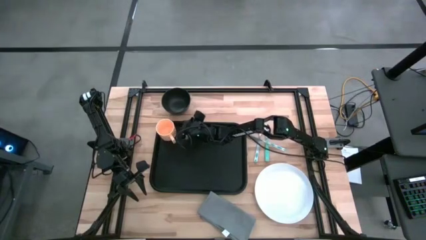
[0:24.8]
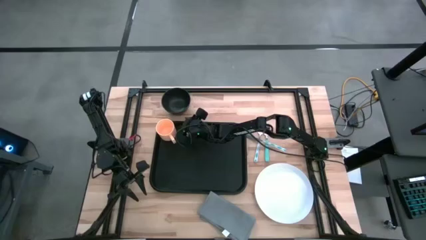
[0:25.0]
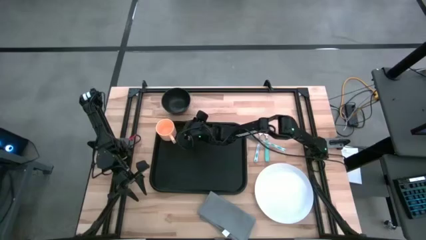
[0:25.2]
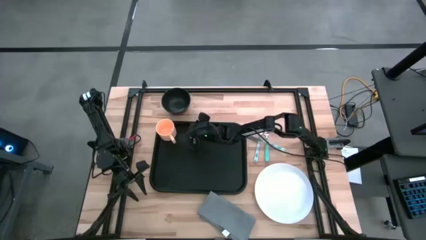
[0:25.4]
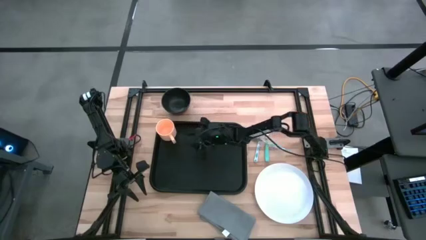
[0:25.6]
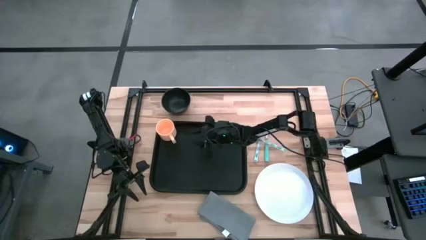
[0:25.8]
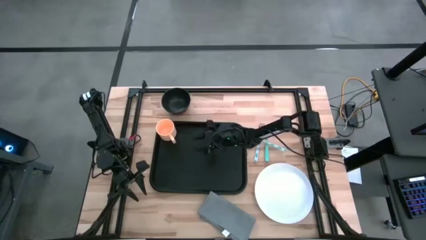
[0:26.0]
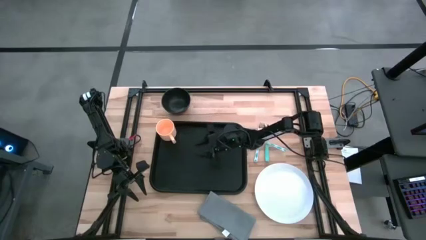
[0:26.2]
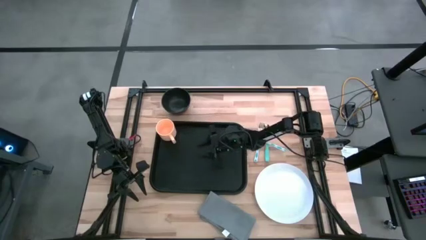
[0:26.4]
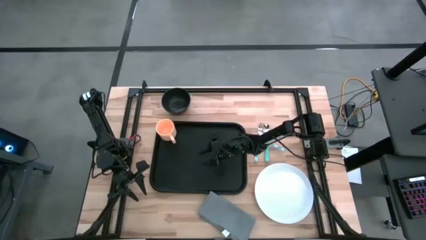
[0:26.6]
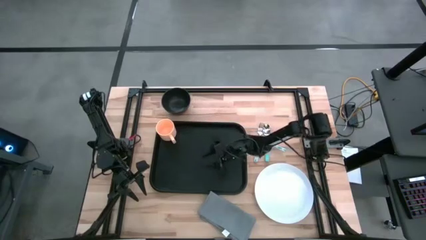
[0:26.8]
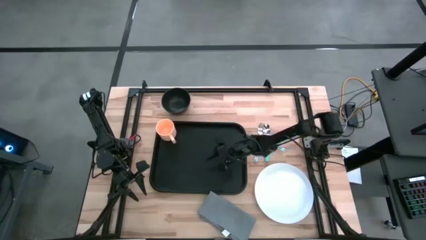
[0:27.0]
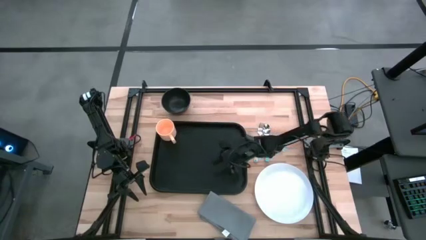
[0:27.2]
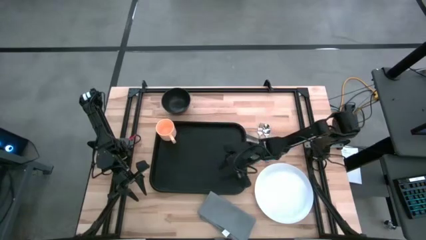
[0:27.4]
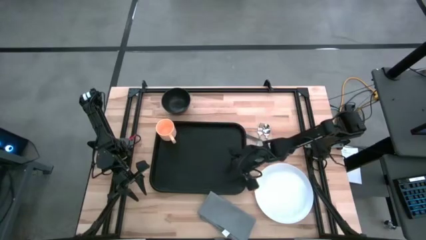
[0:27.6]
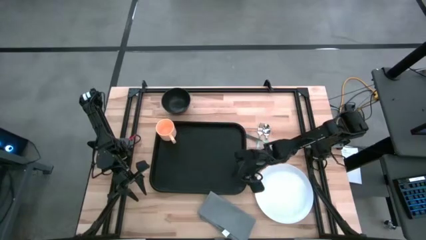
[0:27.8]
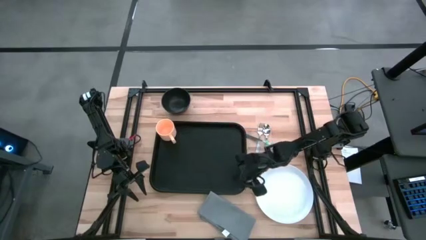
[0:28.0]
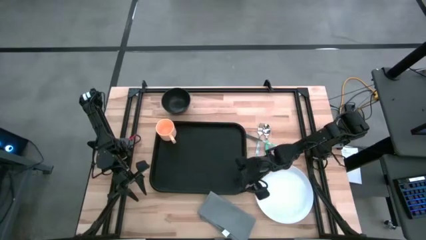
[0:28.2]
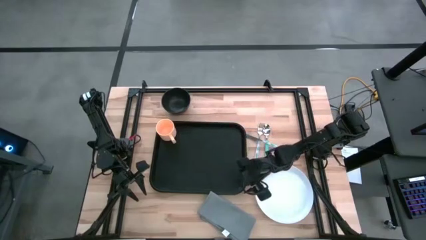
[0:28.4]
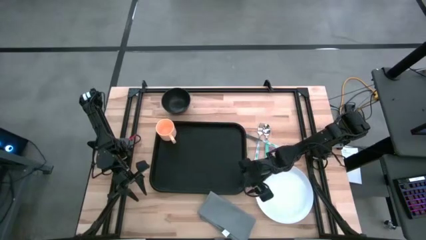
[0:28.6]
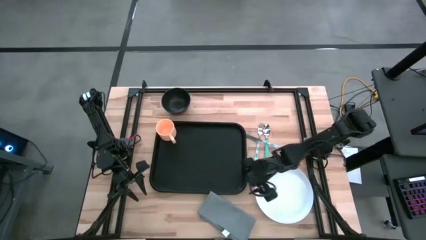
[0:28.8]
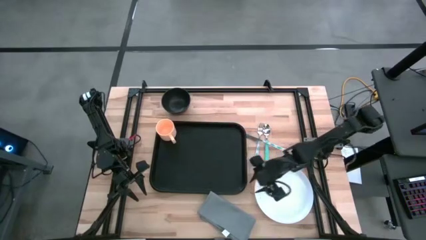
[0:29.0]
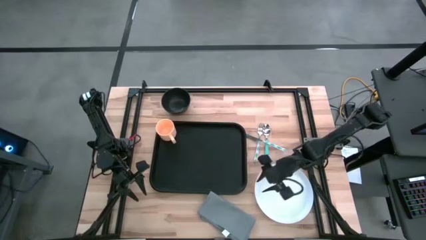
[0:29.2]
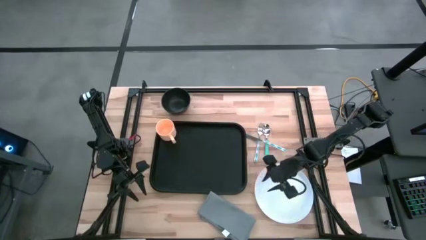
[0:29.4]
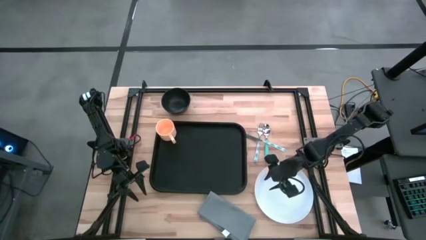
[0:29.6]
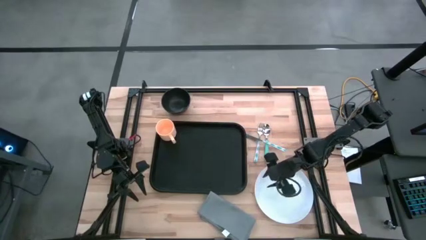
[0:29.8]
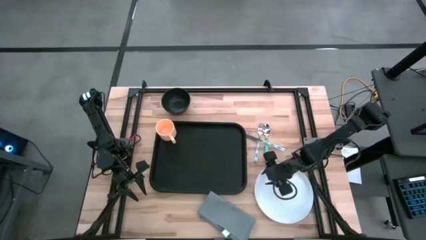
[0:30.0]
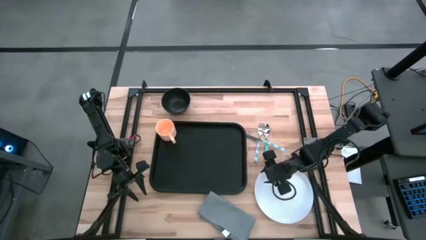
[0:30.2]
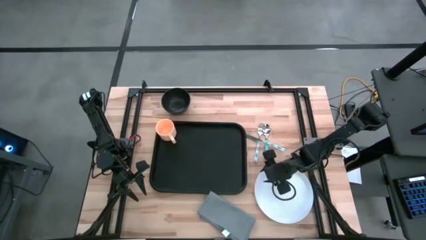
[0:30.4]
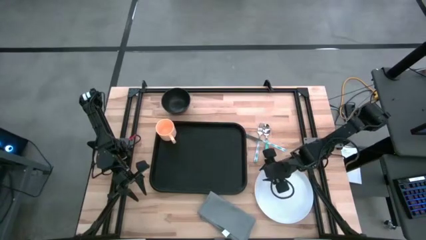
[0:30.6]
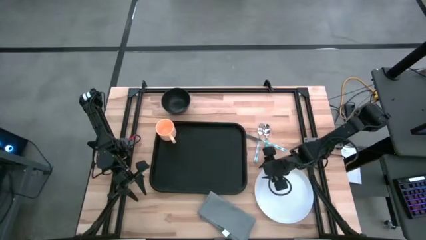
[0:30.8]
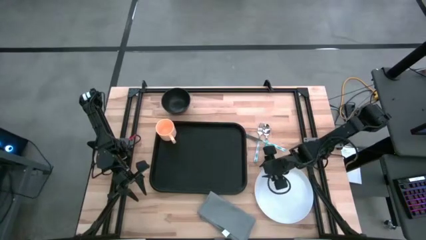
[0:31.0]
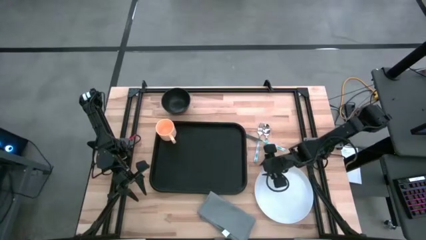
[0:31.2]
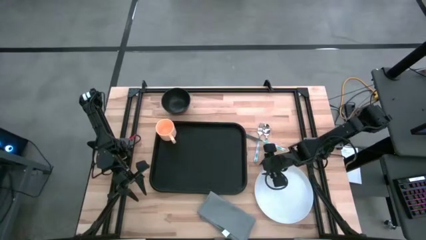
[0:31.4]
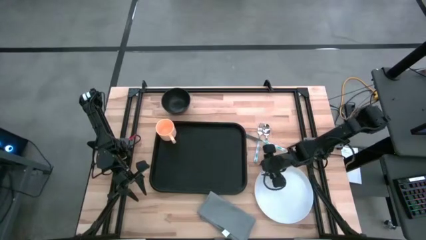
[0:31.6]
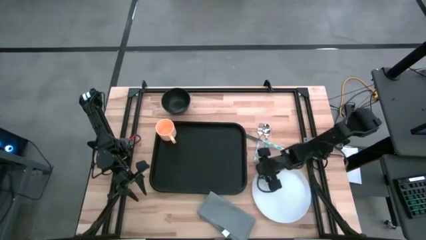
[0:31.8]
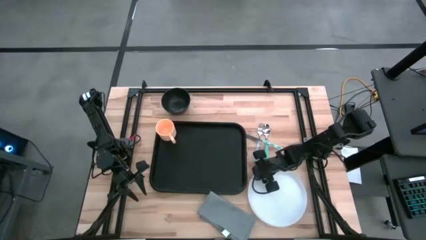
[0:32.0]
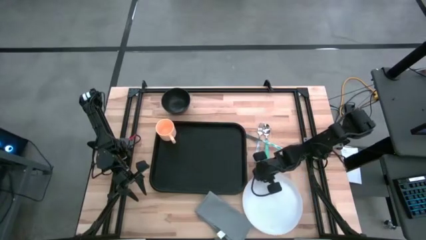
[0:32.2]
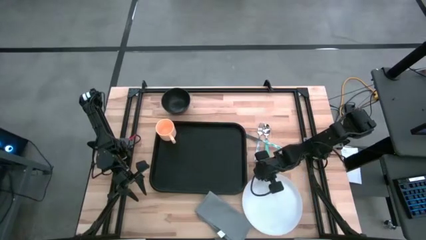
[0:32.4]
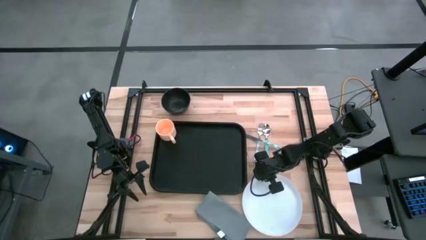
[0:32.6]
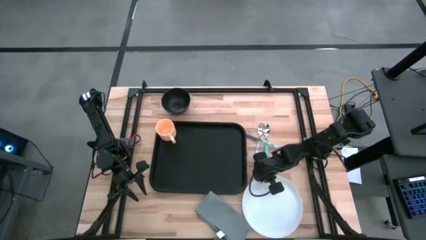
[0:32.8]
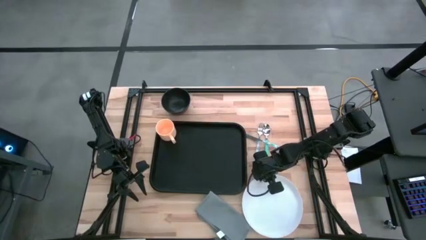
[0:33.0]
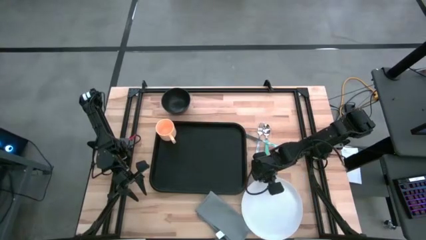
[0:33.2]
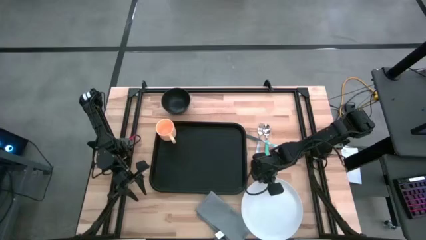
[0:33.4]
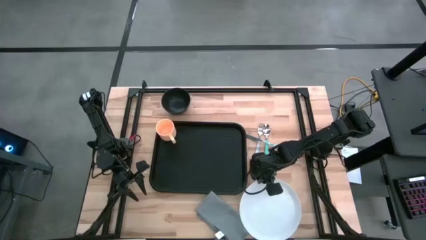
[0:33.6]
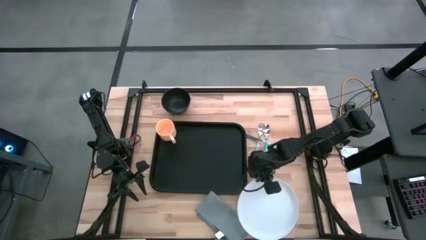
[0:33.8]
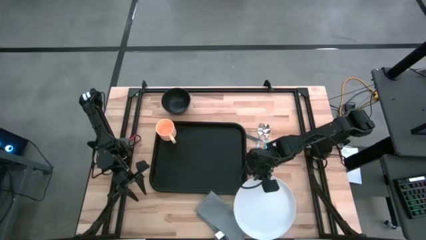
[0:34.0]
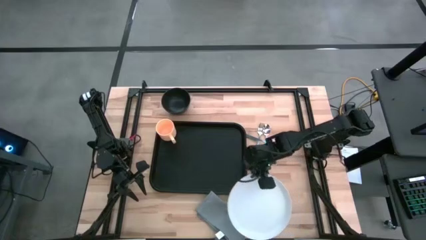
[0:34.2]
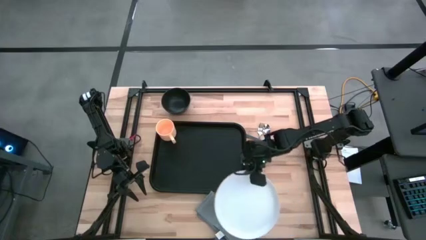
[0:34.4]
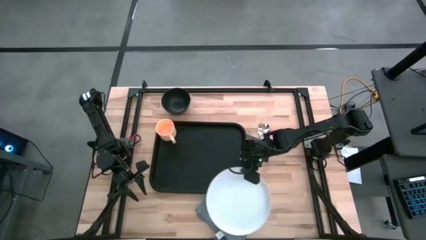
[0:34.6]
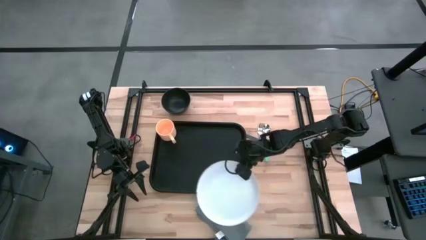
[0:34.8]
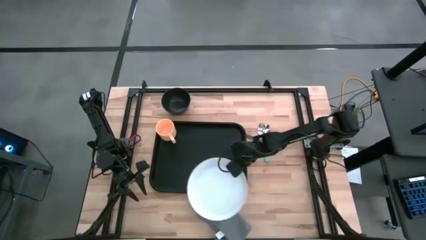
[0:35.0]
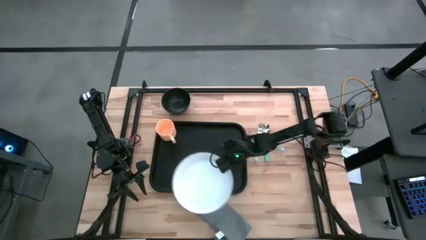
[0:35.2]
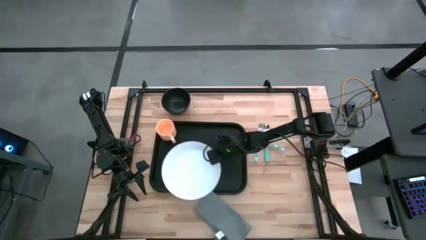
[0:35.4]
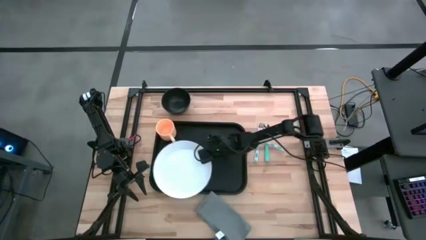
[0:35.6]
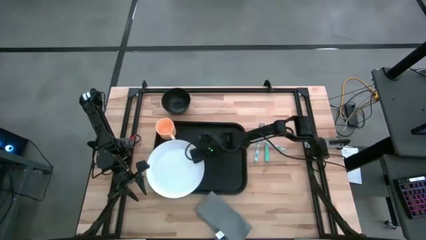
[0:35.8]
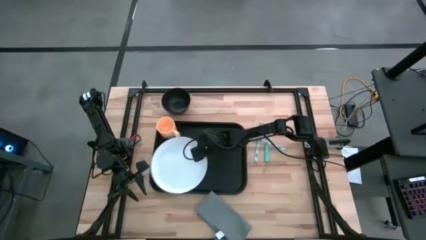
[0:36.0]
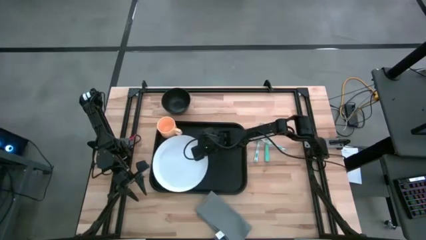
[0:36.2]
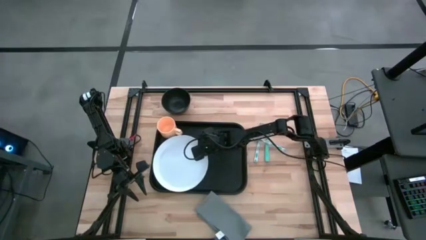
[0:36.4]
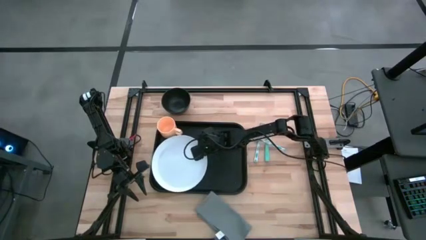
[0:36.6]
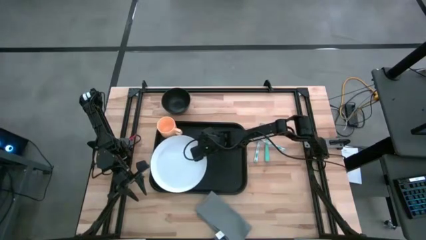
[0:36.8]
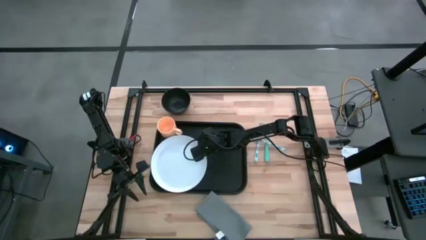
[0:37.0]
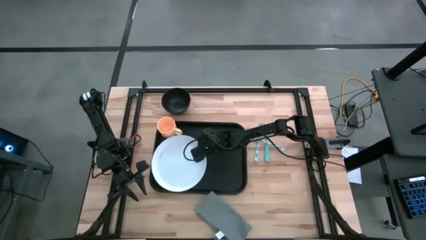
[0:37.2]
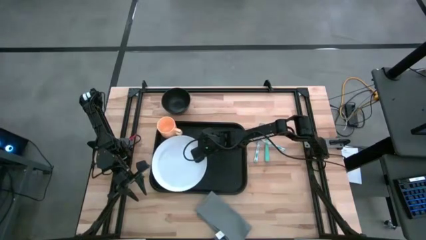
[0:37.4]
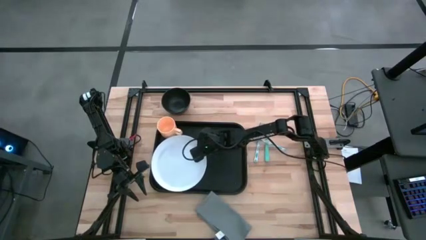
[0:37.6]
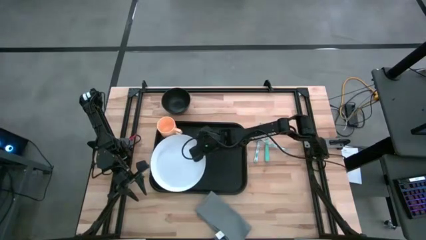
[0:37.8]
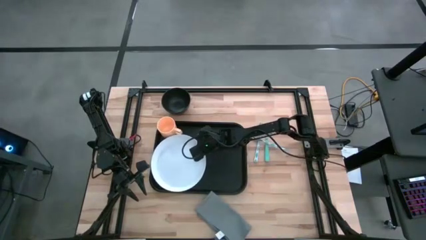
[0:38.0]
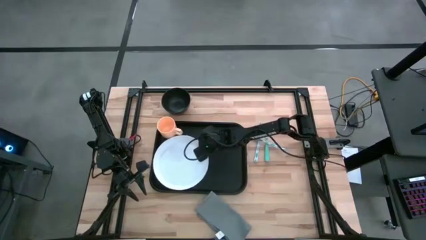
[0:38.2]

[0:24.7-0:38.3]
Task: Set up tray
Put the white plate on the bottom right of the orange mug
